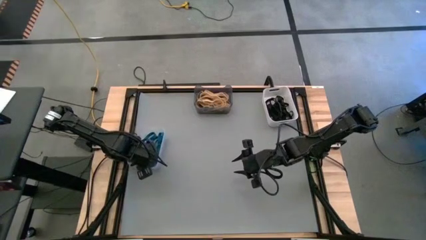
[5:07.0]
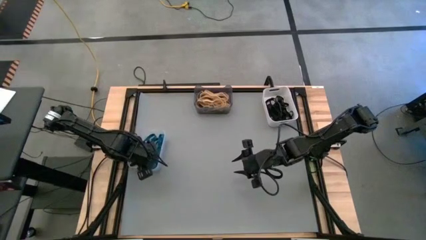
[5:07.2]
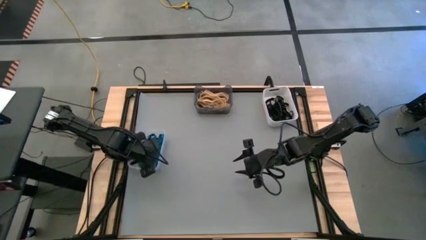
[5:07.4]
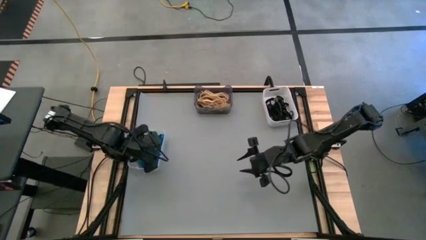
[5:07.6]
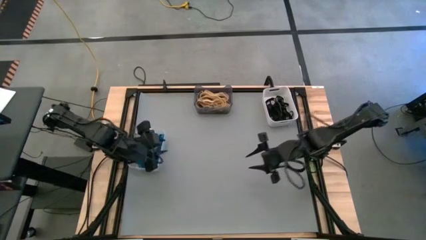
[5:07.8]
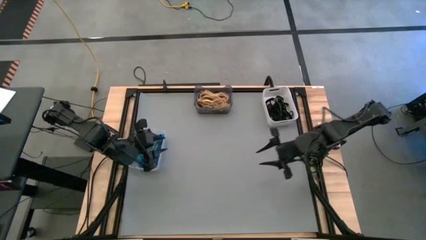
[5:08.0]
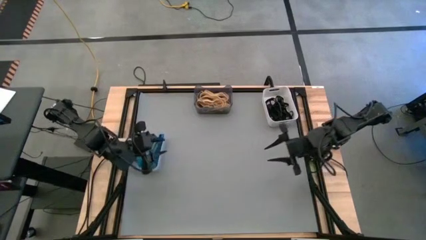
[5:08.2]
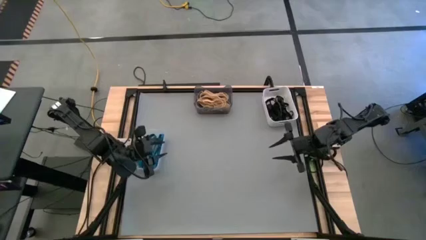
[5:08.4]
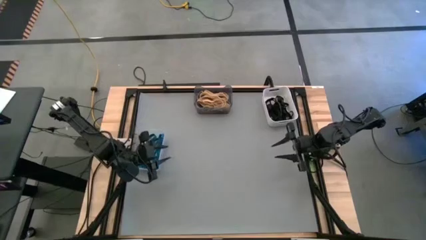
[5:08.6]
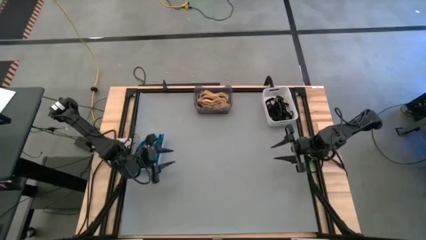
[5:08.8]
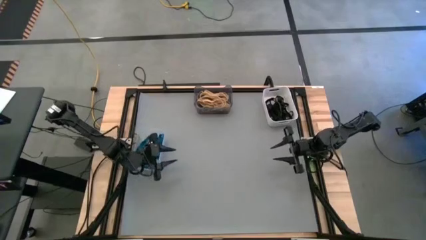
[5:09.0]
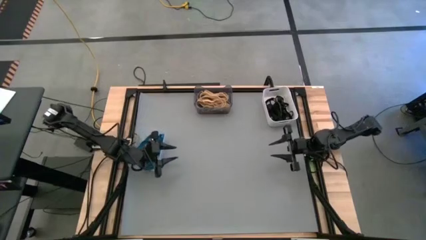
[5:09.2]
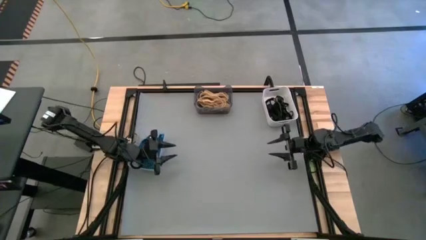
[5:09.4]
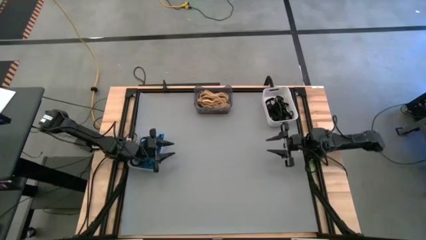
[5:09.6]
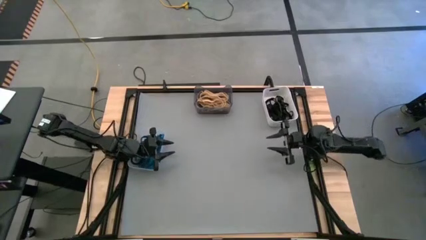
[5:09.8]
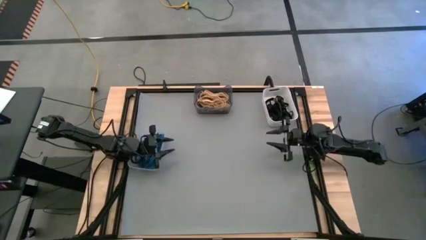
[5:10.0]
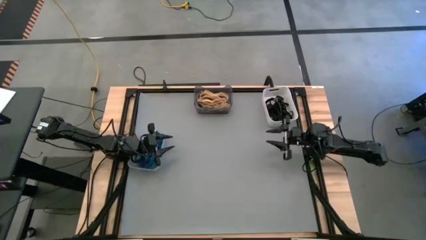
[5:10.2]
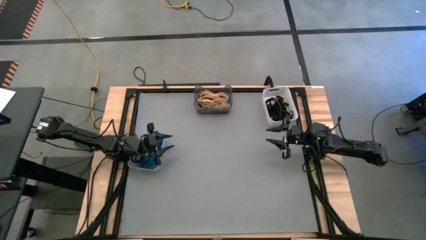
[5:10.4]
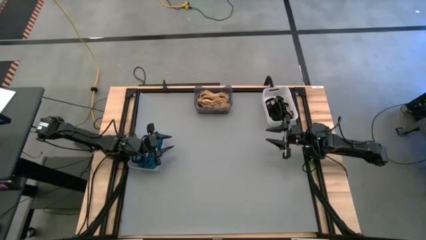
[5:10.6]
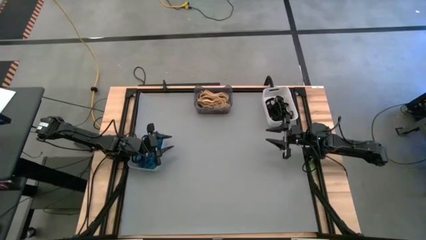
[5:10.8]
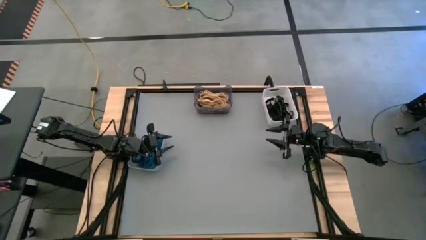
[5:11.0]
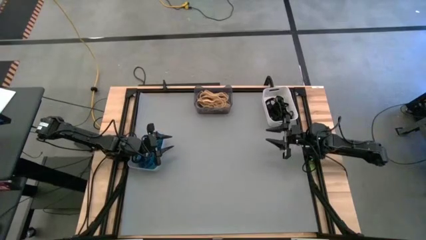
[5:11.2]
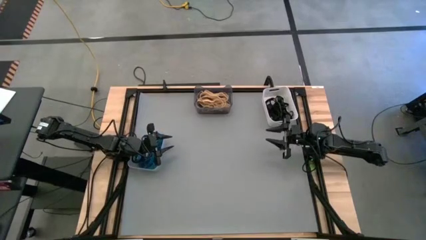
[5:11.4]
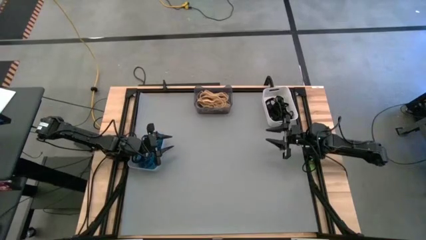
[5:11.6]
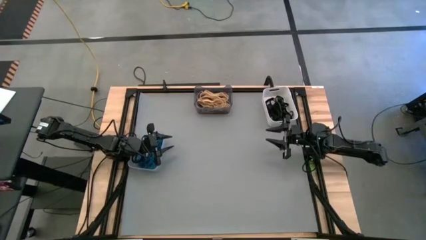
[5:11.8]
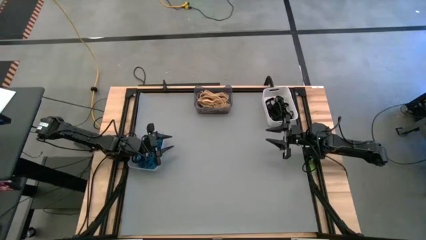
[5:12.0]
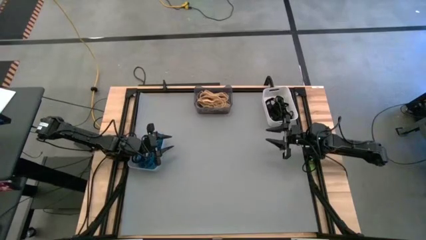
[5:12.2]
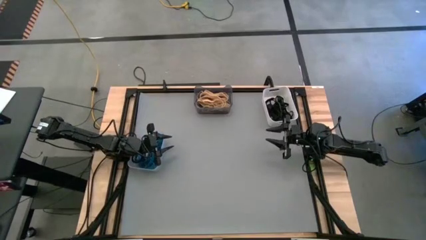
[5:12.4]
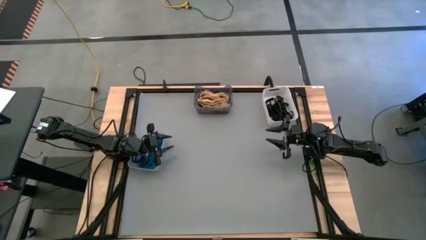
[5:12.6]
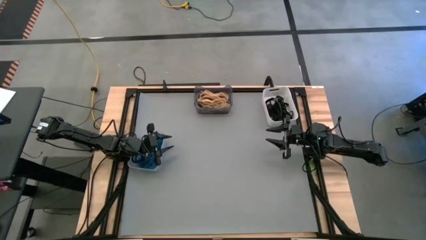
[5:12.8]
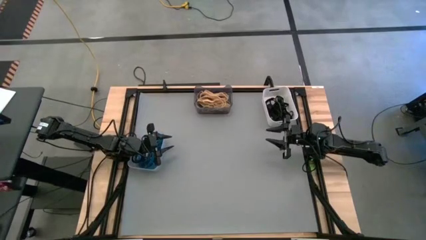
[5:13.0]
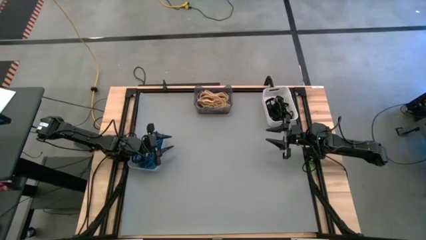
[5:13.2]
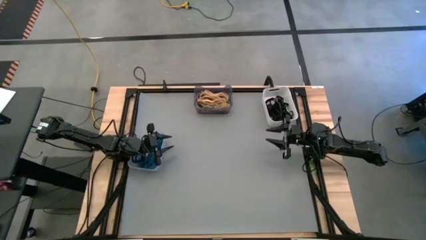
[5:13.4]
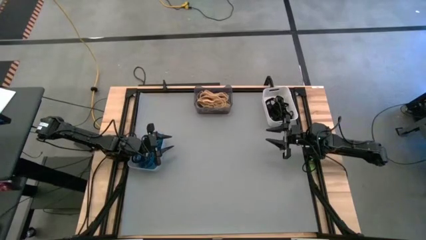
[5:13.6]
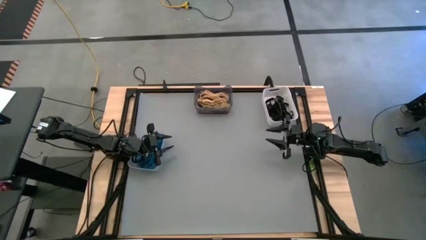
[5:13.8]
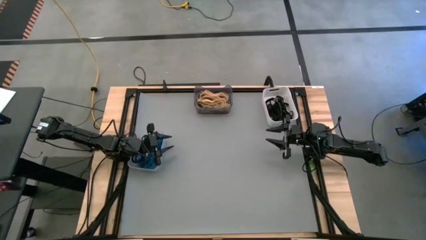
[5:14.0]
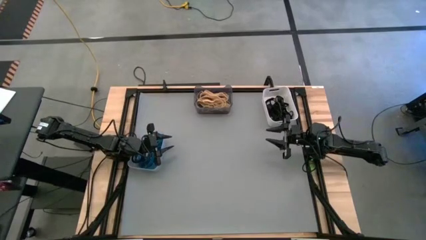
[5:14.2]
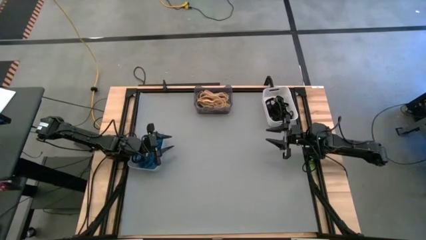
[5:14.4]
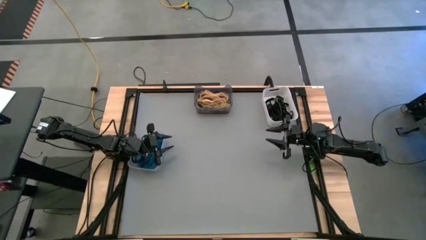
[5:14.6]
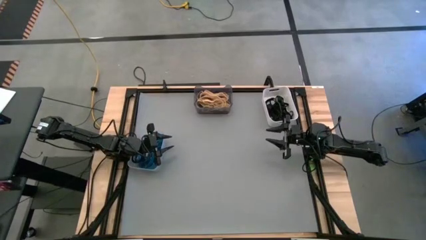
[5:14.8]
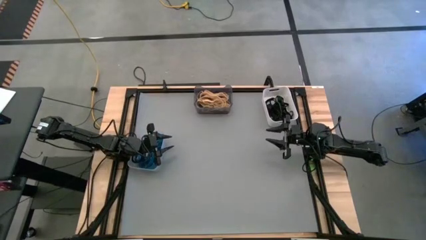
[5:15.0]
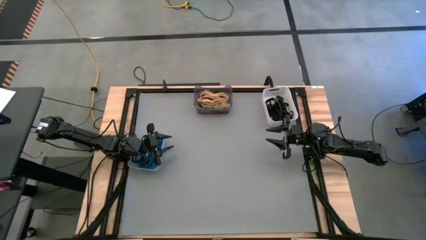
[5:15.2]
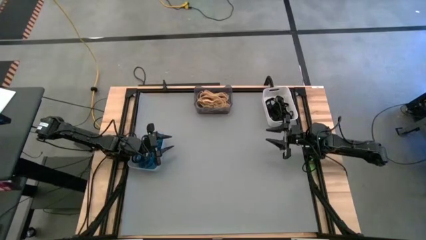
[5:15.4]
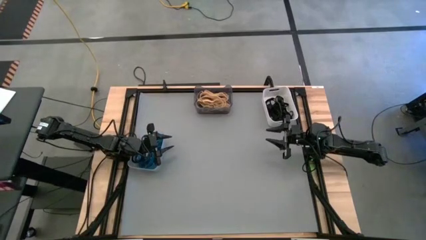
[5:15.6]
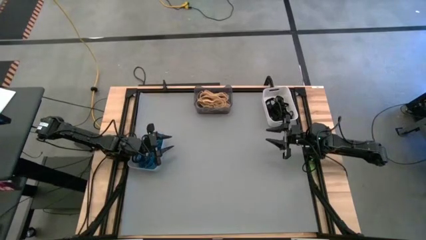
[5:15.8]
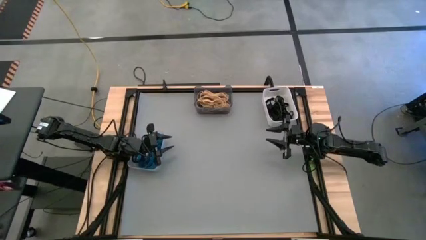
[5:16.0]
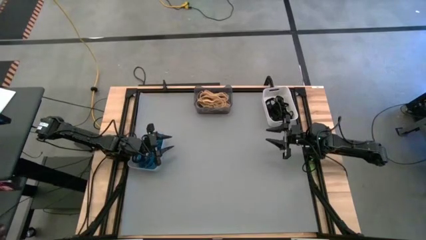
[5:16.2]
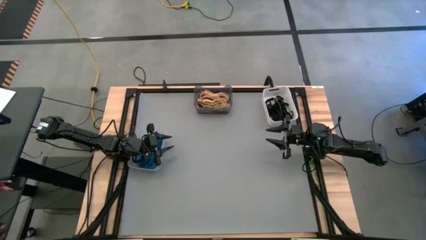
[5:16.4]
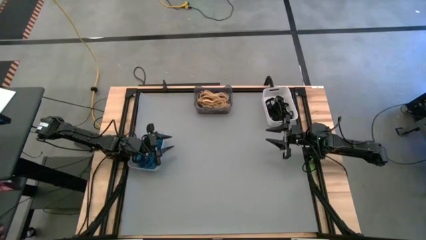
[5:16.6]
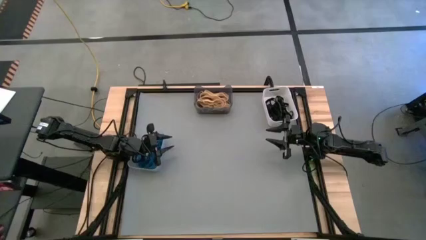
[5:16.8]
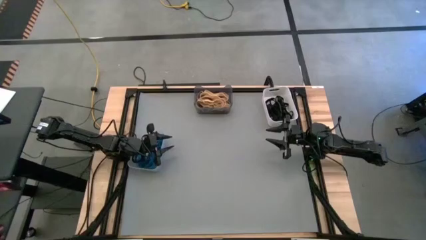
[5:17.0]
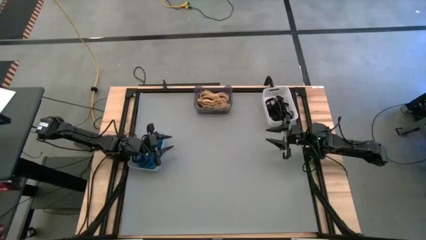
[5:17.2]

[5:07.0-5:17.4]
Task: Sort rubber bands into baskets
Return to Home Position

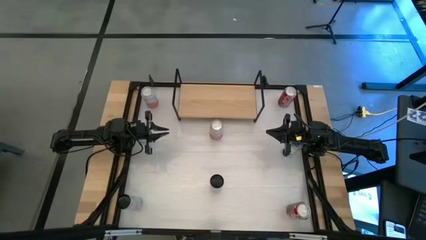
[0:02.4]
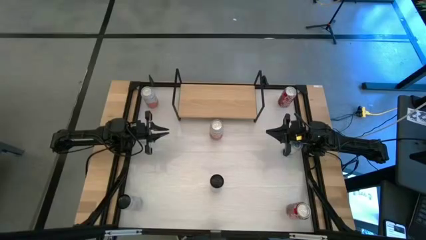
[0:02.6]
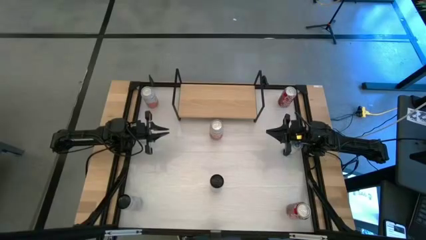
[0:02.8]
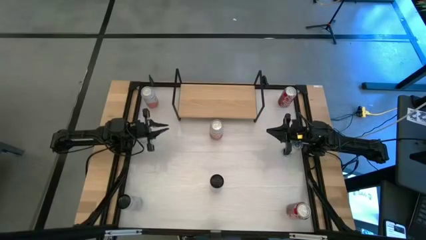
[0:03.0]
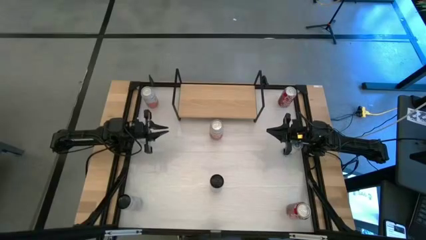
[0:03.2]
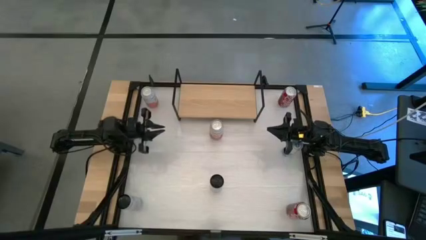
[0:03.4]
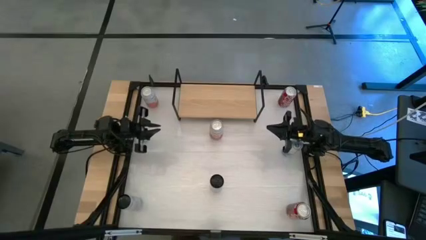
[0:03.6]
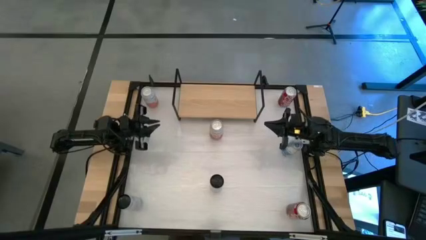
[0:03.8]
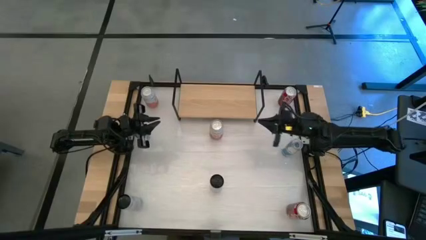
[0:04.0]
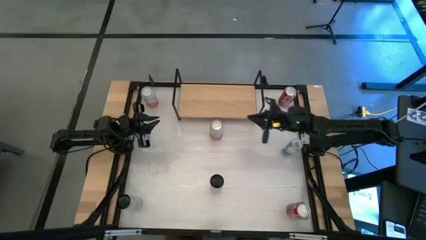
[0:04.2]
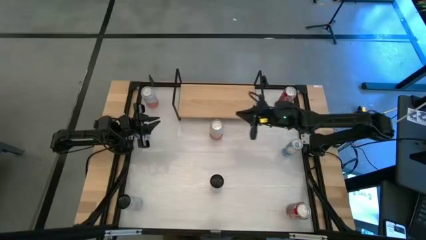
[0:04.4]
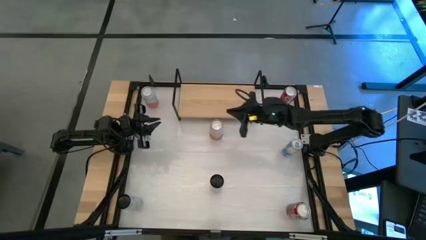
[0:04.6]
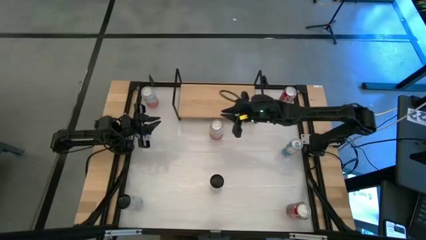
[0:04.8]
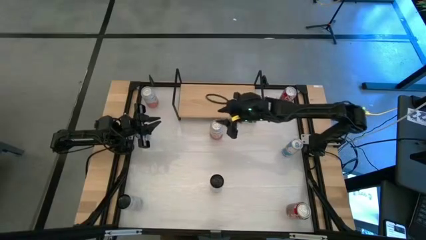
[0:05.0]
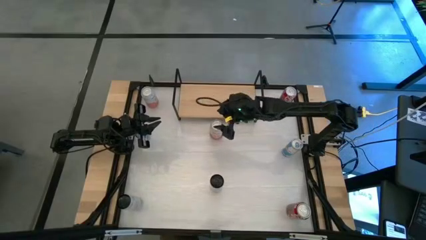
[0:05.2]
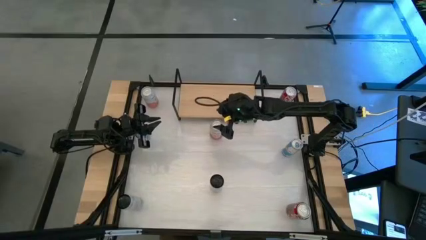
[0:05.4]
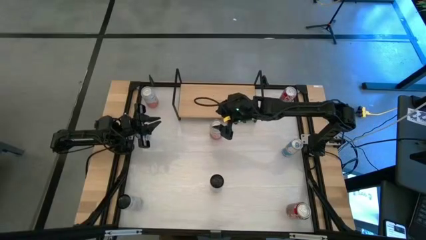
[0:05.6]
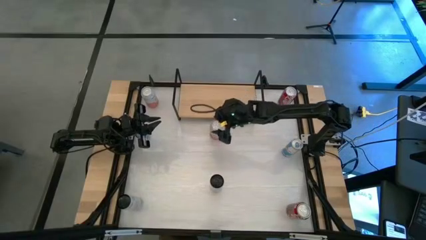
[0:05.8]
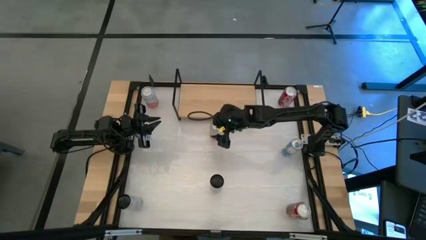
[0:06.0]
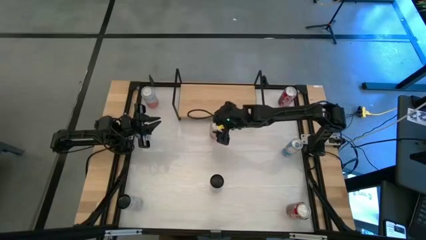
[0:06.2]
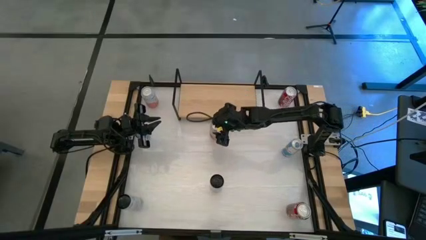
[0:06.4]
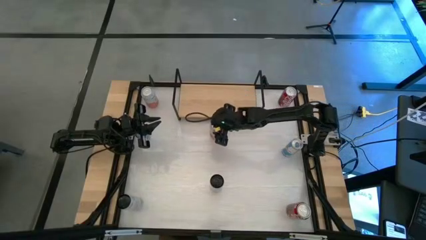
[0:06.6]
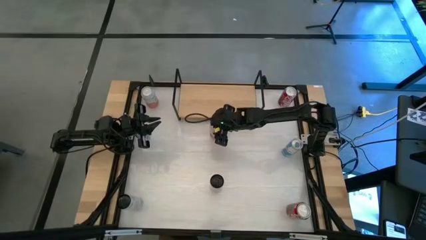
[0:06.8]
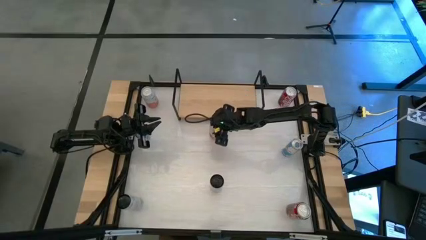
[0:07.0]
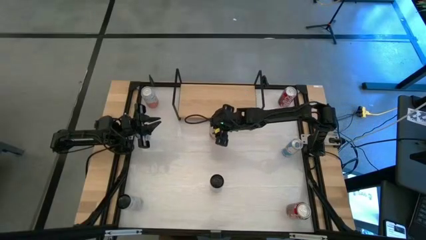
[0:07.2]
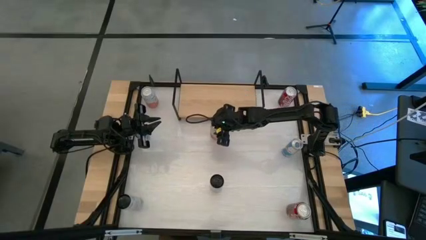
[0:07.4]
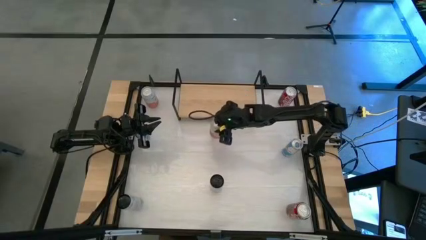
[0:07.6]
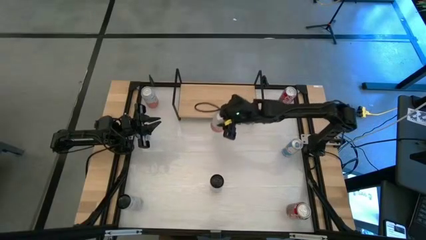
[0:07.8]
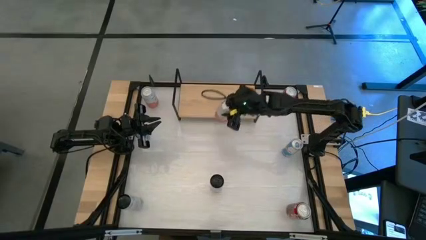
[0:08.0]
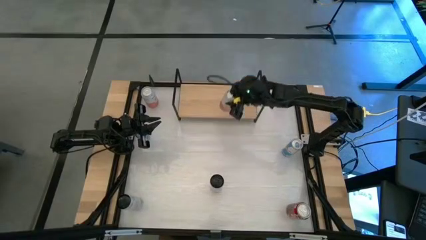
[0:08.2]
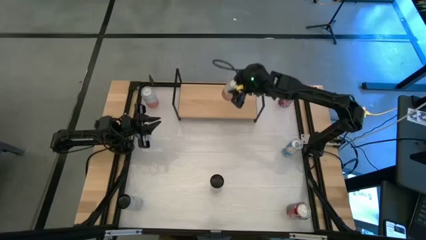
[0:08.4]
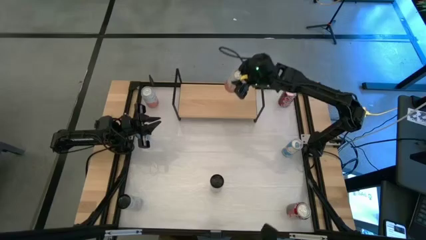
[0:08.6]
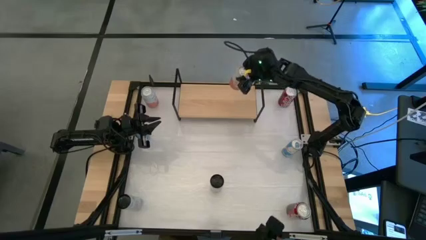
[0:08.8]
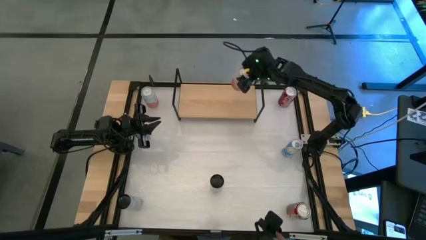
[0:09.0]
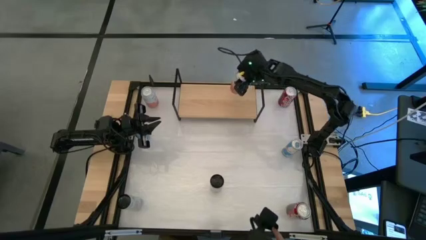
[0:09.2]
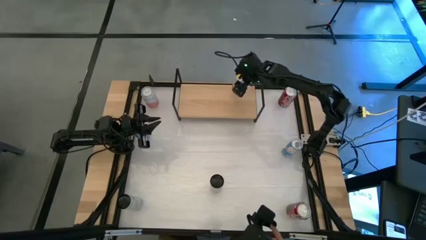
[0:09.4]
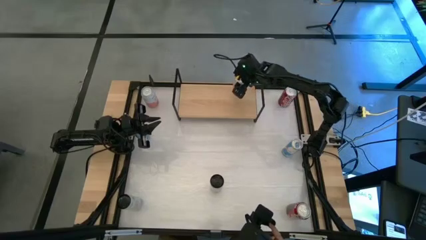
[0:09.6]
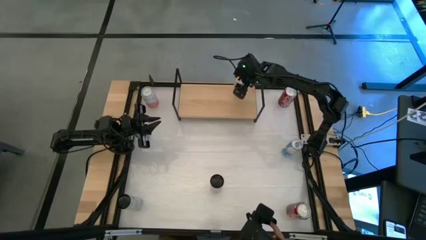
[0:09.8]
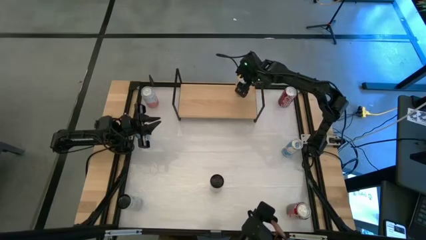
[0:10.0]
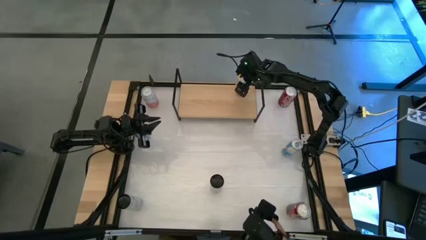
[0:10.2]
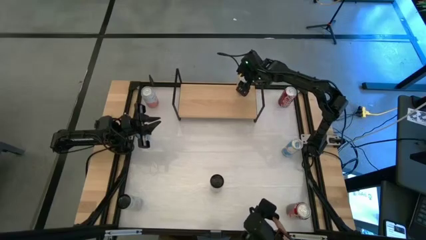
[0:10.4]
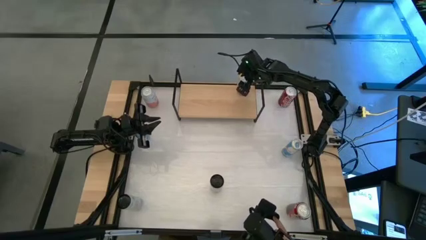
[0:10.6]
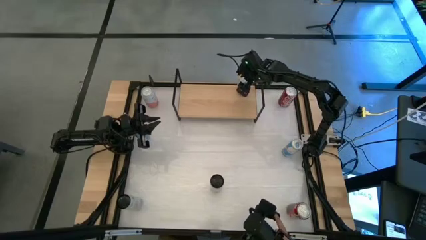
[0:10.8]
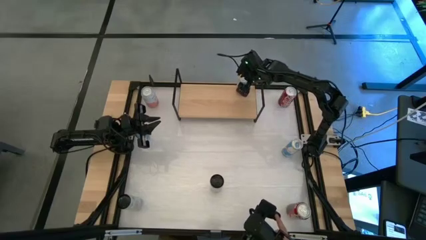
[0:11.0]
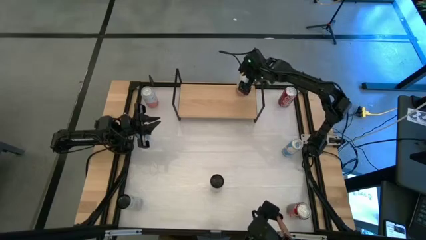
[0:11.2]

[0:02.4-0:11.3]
Task: Place canned beverage on shelf
Put the bottom orange soda can on the shelf
